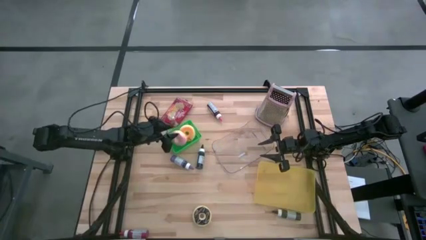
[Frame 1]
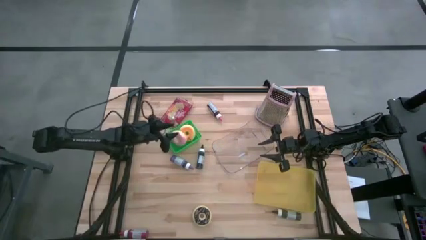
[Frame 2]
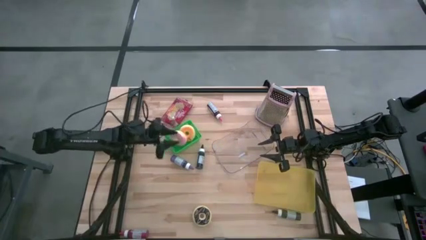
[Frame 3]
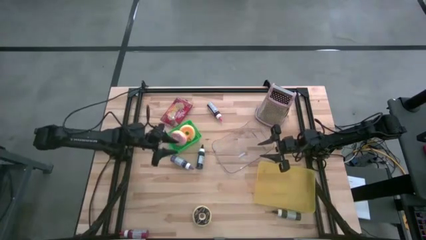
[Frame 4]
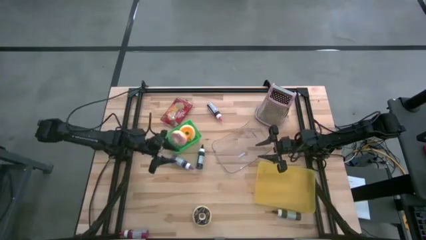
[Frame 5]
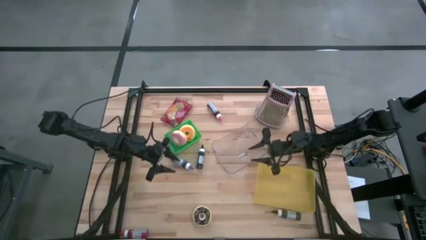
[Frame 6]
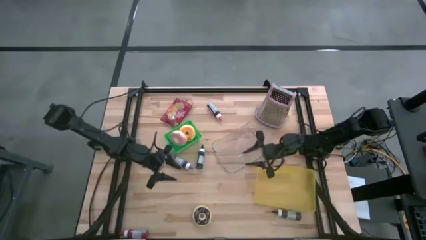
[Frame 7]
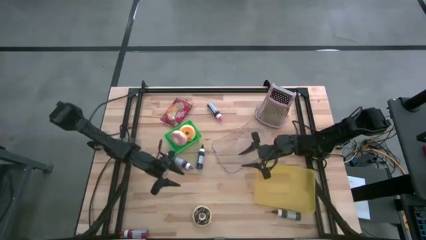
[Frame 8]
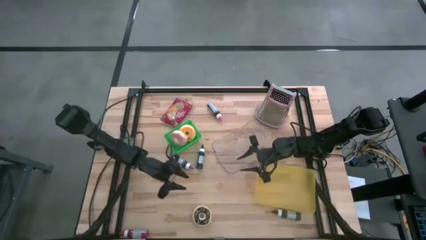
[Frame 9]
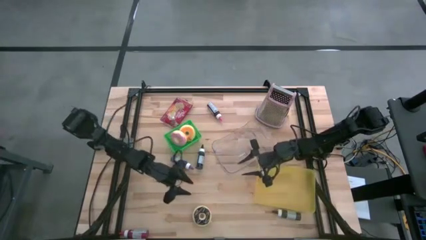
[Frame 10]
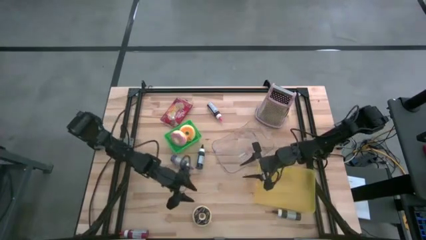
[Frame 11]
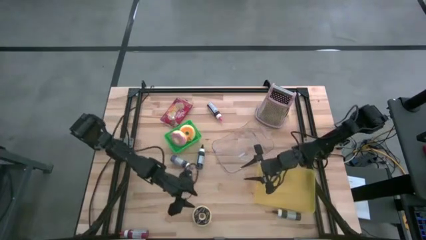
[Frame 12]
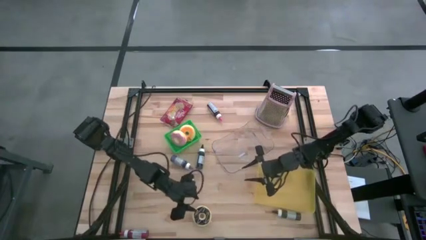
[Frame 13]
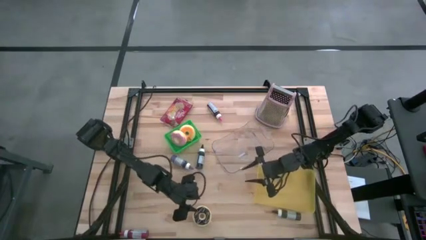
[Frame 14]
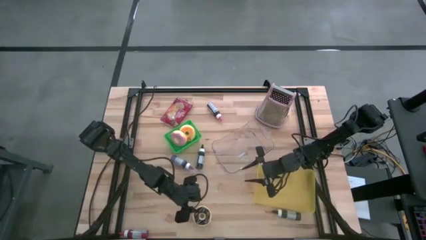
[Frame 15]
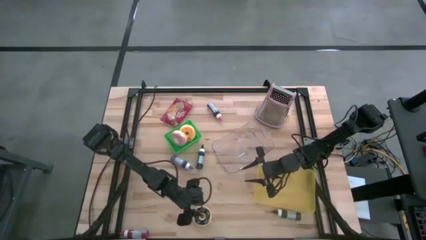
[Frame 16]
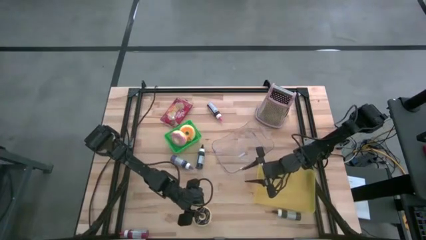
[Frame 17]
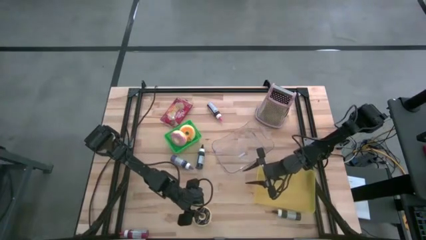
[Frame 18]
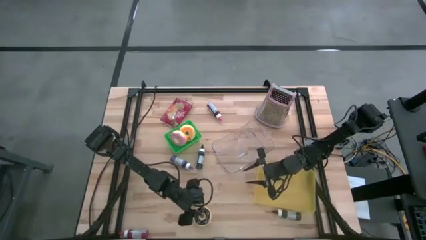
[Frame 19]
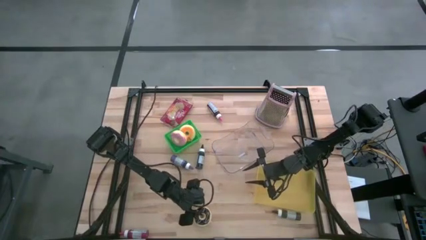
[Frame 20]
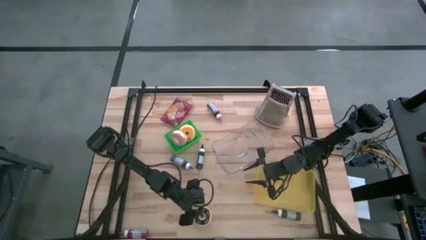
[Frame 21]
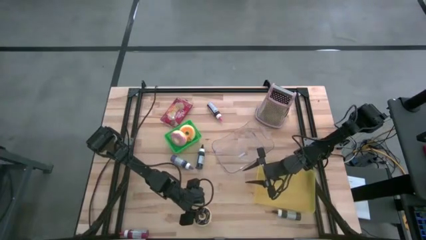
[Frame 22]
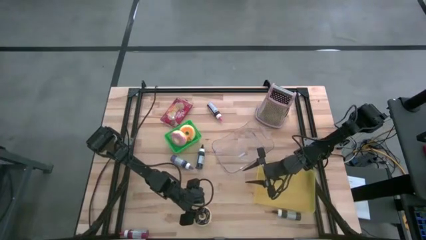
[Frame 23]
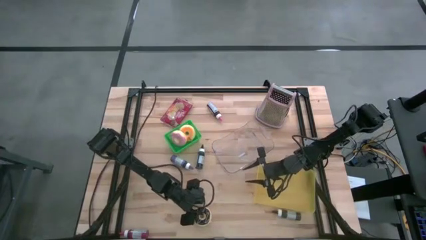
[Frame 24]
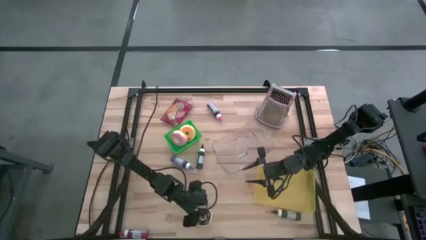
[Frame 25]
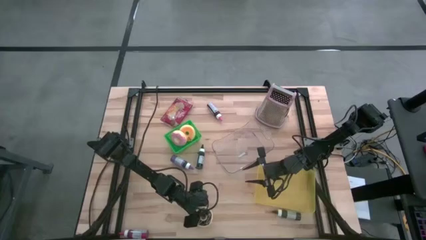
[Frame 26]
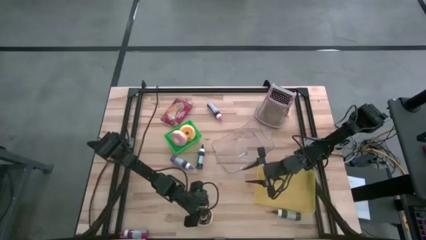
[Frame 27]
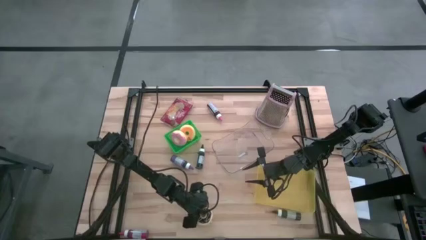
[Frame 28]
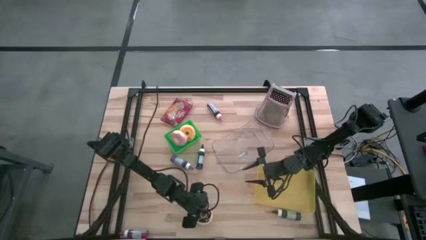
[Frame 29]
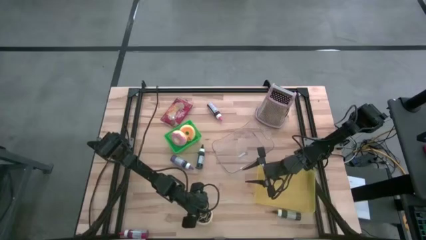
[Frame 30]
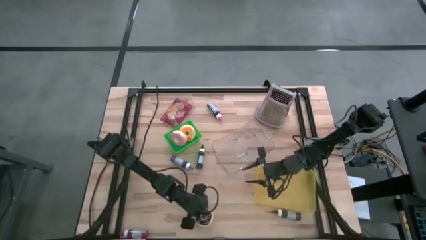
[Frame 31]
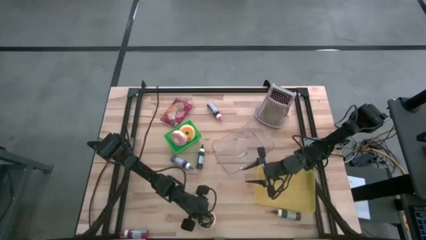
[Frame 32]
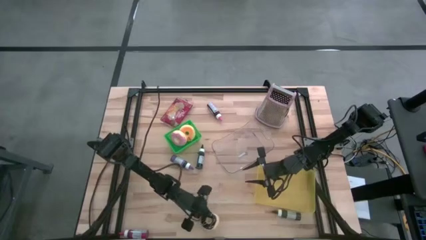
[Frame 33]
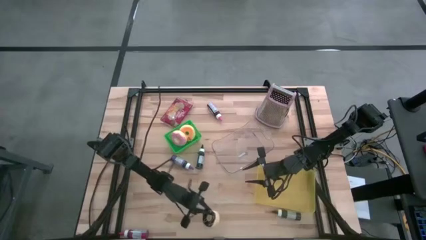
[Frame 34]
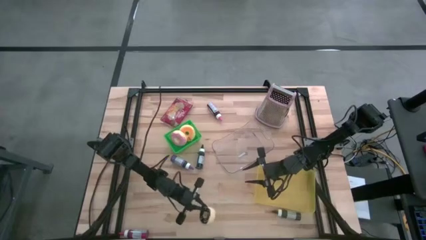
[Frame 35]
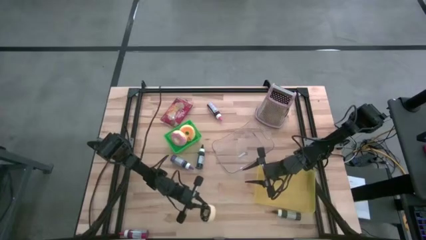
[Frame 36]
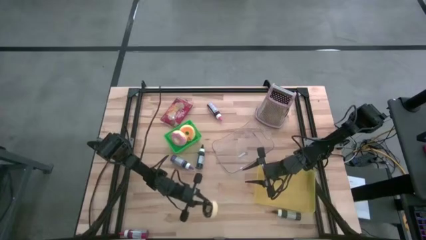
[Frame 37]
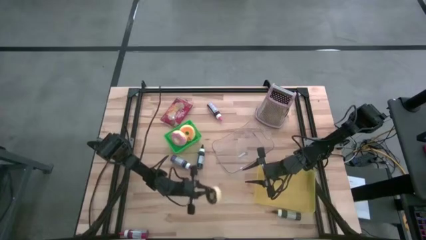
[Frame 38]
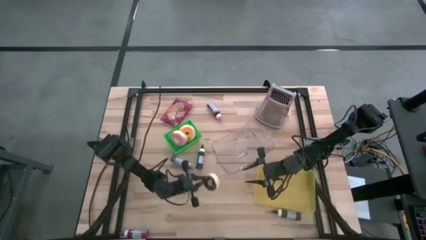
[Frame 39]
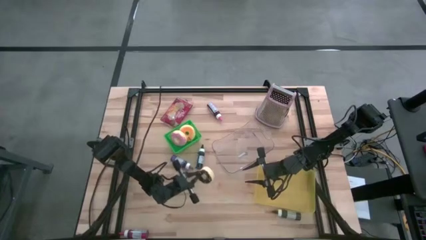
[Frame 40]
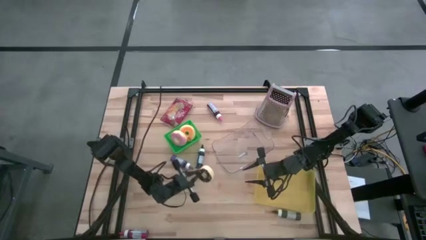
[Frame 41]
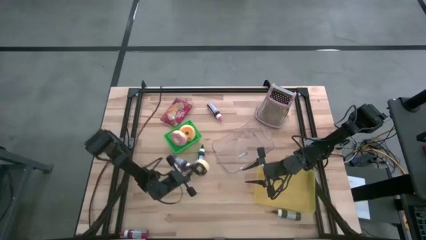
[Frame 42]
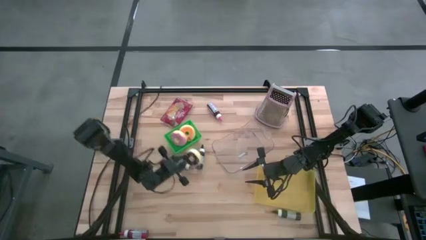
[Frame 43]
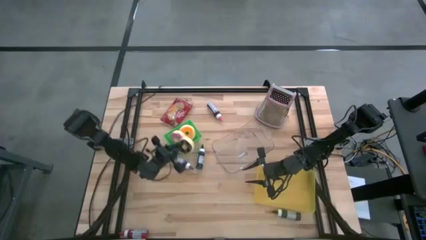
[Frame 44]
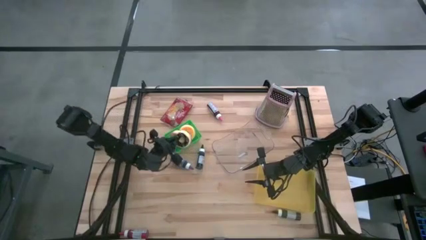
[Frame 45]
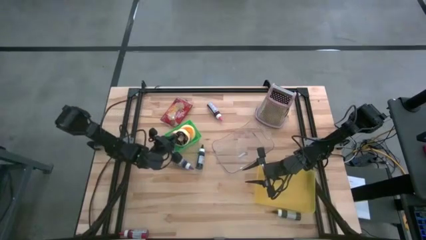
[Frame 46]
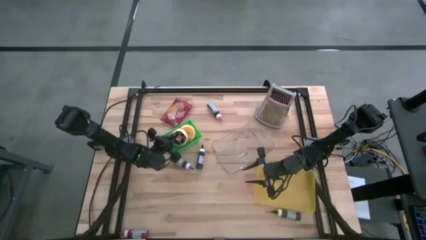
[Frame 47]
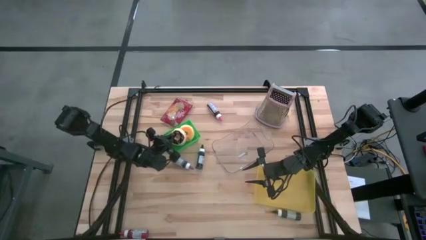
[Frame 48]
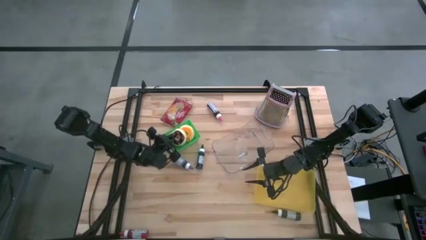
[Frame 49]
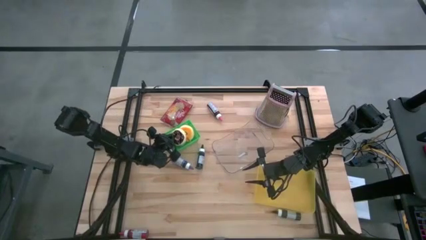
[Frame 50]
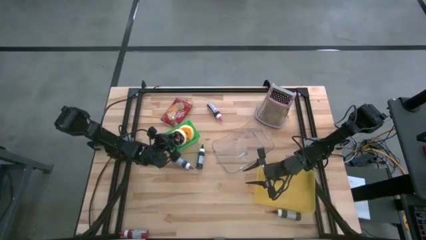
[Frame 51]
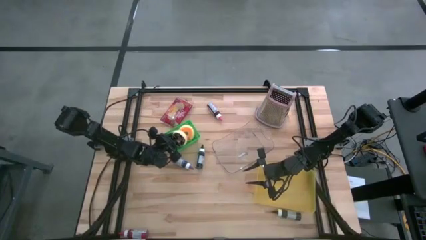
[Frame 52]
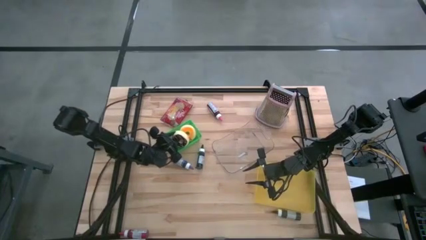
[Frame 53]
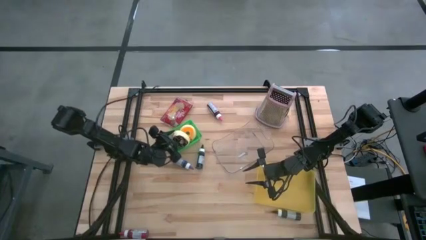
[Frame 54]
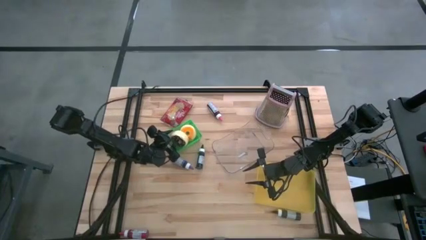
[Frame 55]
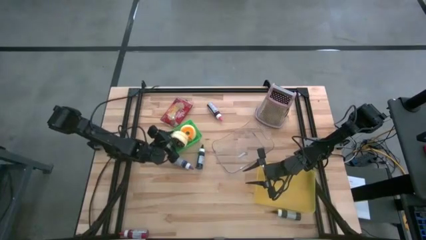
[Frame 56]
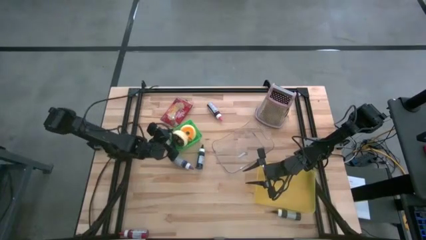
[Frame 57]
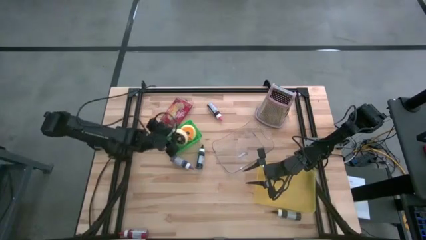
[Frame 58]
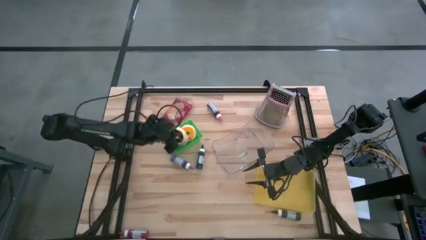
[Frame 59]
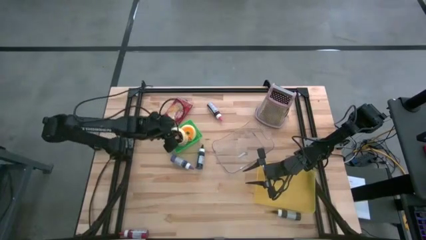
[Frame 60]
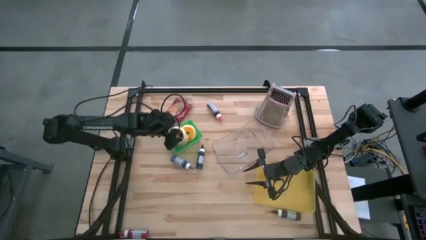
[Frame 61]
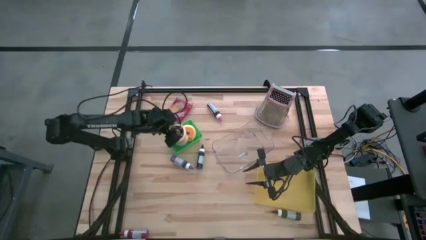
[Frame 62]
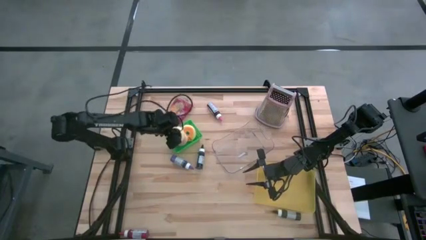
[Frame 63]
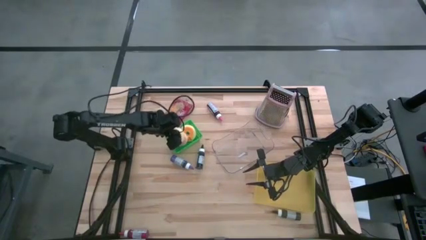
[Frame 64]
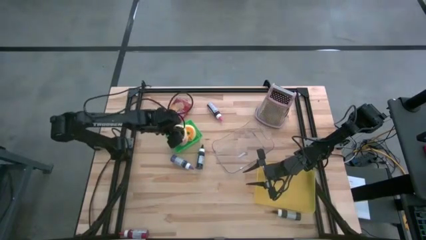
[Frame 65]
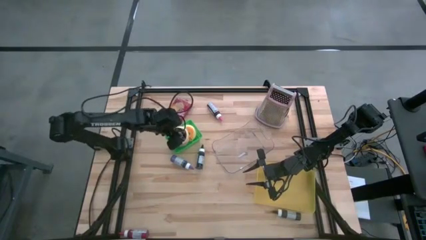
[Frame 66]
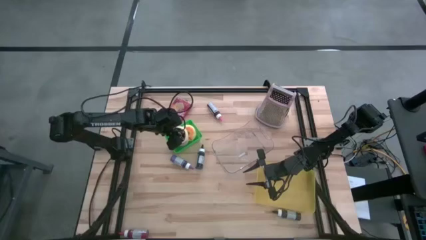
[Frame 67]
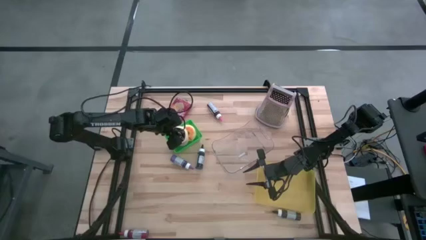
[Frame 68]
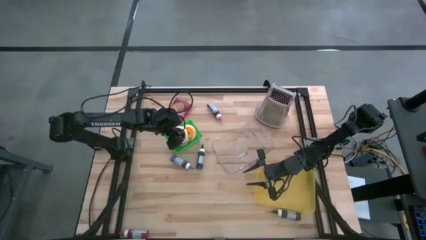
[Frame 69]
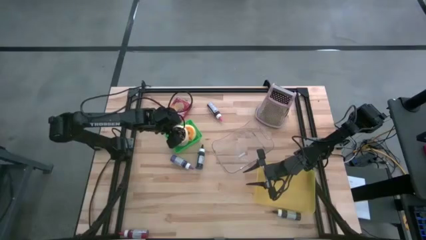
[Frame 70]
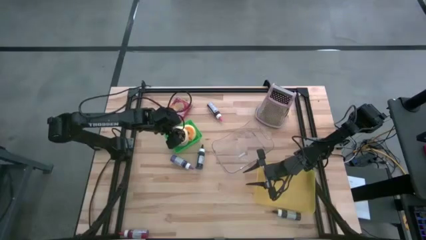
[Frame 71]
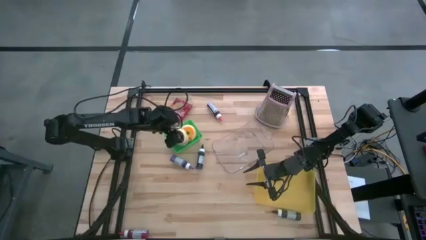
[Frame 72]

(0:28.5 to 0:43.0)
Task: Pick & Place Food Item
Put the black donut into the green bin
